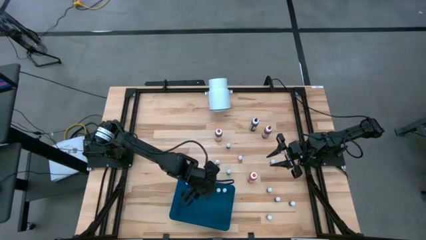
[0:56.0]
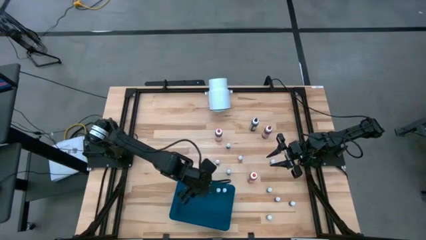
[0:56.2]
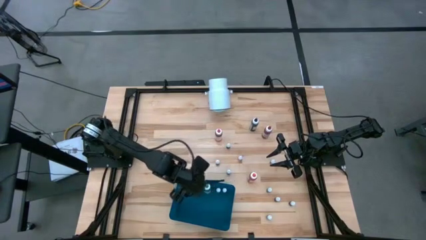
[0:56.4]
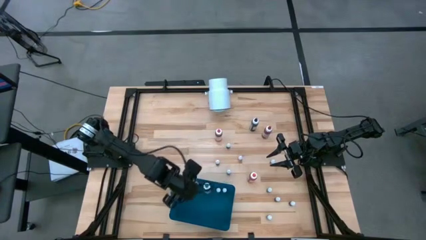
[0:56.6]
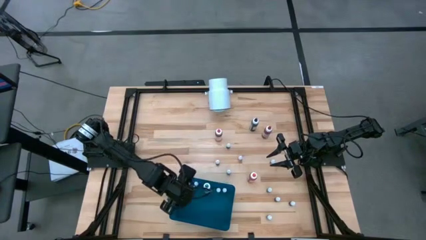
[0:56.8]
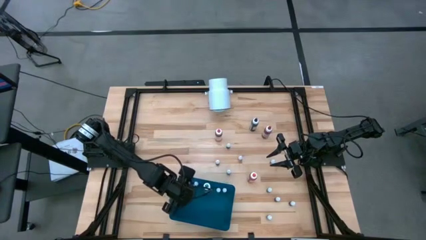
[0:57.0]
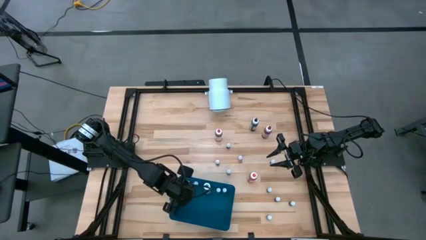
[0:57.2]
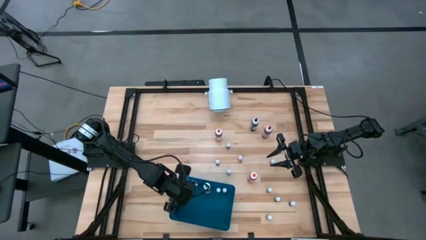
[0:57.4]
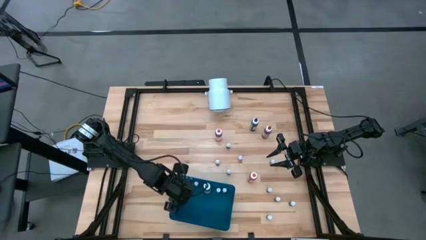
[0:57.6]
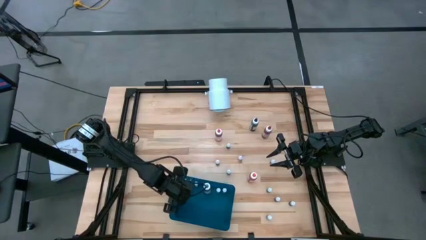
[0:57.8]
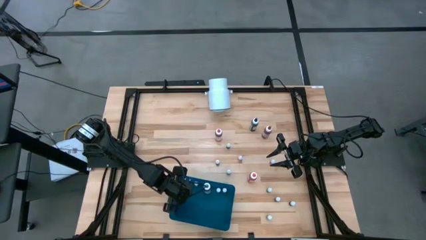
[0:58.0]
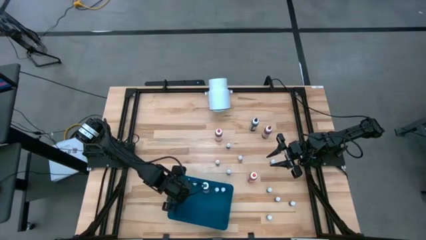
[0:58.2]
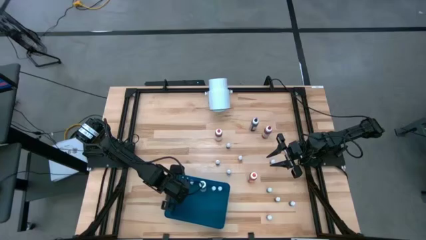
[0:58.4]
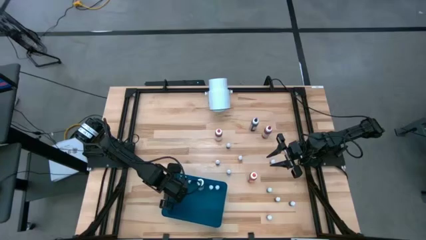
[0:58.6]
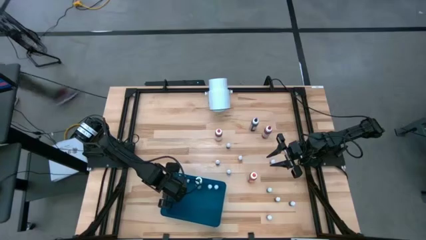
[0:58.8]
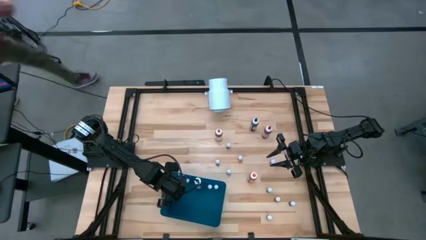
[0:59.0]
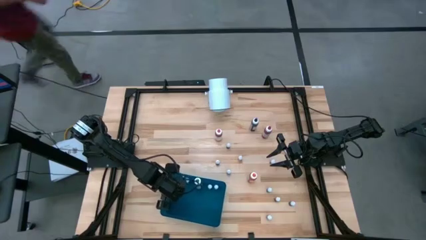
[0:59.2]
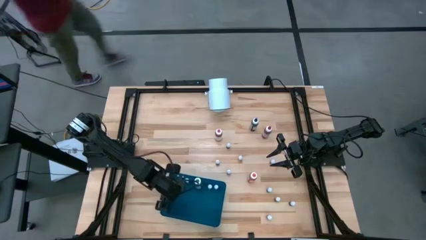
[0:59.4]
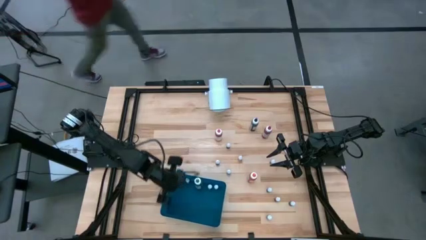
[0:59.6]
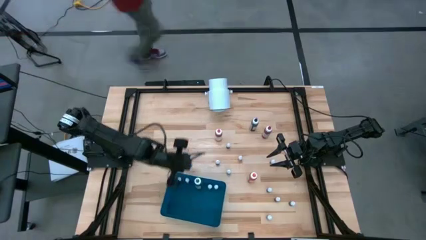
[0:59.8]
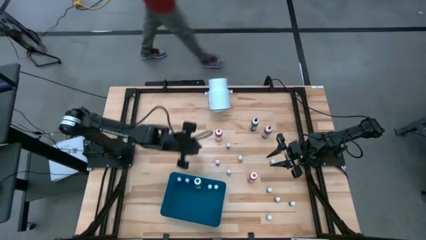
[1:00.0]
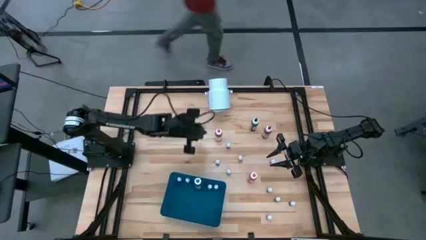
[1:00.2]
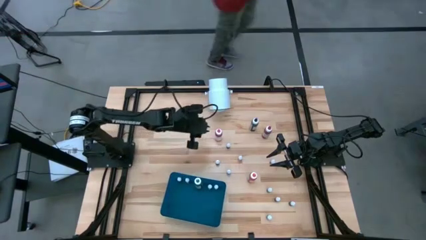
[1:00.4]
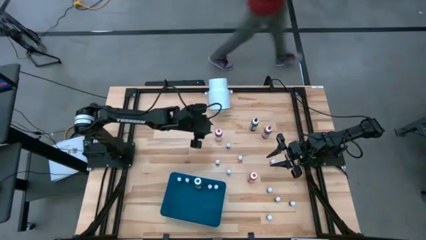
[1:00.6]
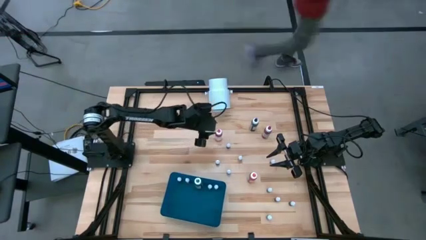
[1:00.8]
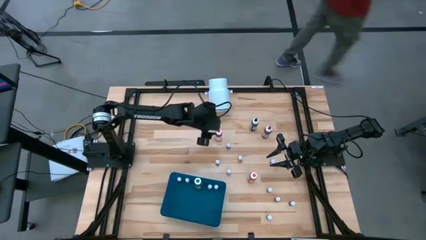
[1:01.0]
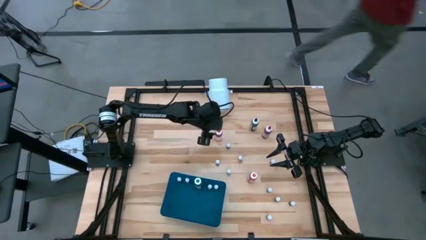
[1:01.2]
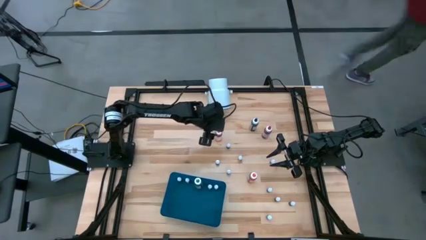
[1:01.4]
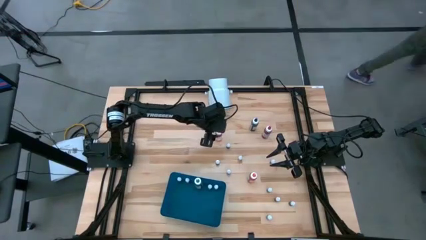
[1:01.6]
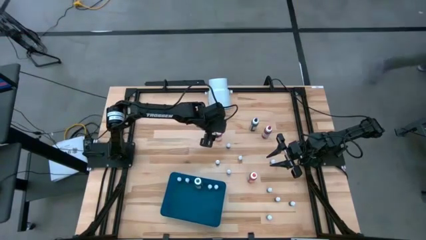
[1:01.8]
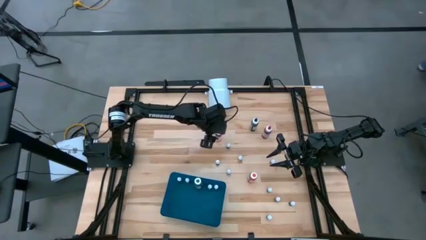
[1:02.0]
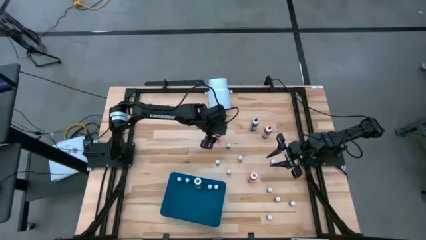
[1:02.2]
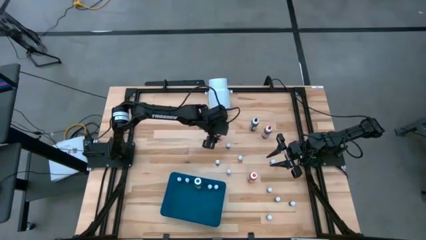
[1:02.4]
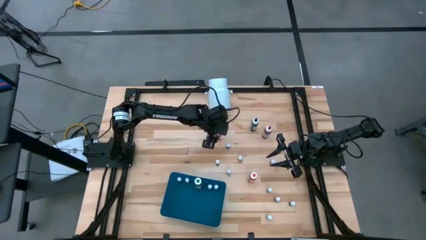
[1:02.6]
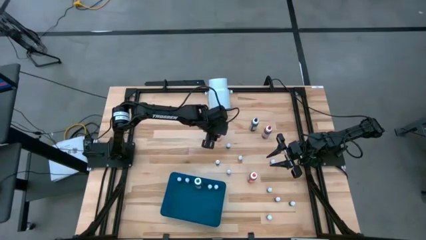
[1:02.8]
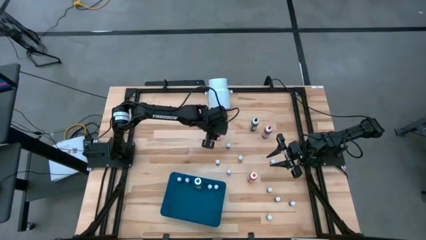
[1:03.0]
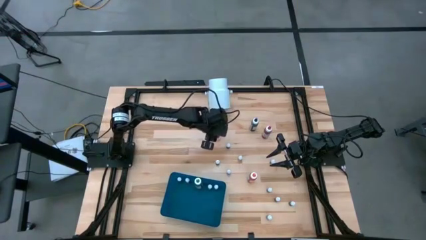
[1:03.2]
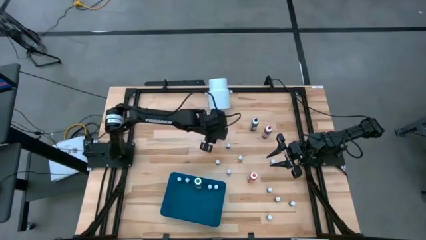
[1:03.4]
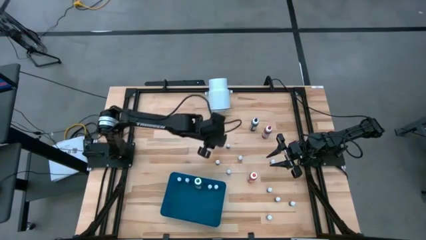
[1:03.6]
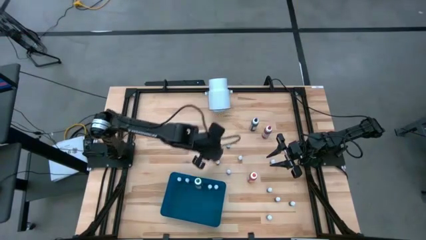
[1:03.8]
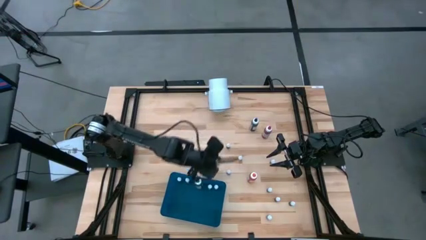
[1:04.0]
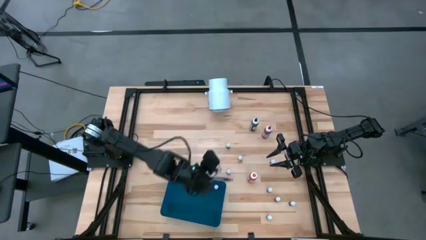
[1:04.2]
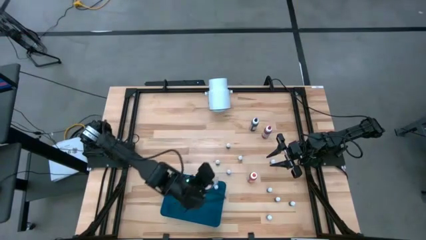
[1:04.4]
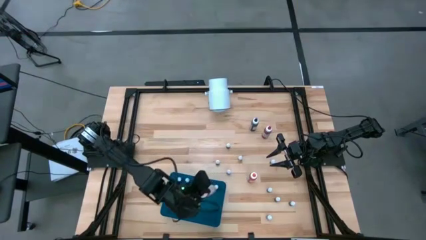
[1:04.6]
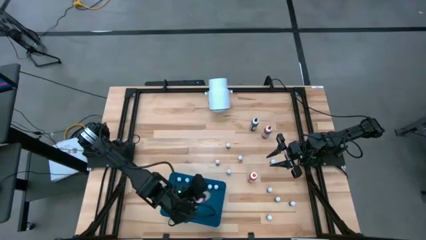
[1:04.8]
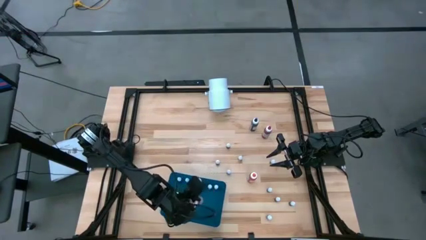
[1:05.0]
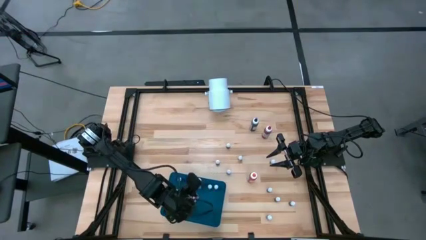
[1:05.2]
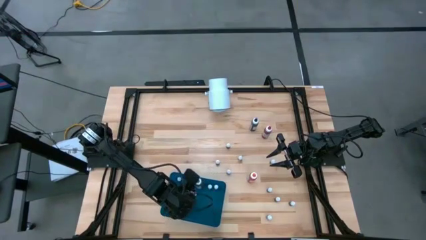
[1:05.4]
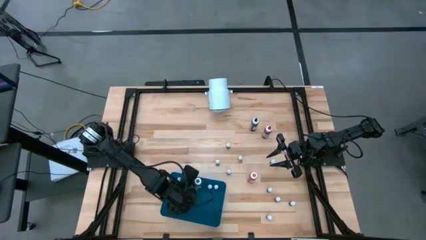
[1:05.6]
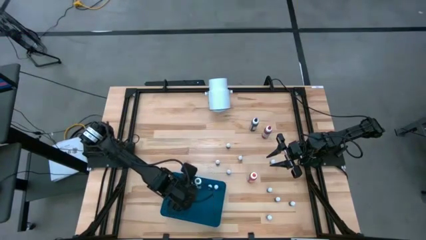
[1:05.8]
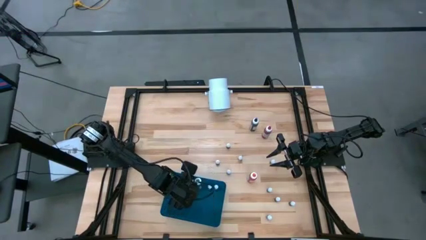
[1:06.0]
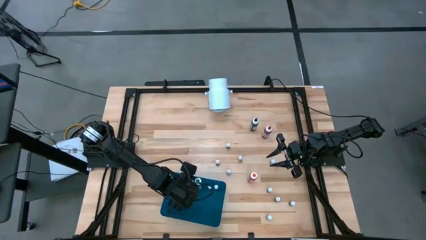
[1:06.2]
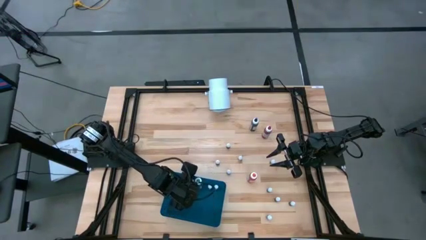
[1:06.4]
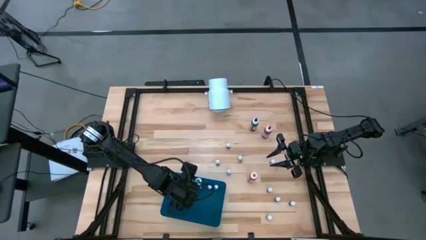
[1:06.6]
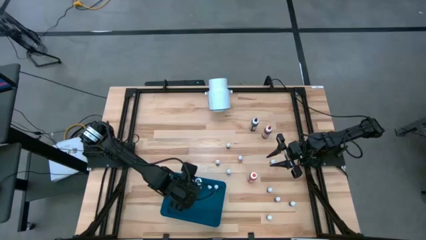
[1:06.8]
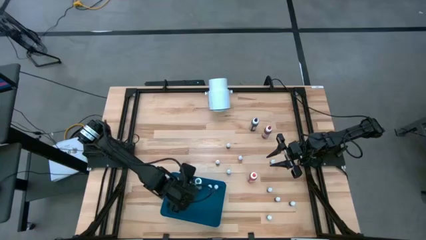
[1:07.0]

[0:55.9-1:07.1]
Task: Pick & Place food coloring
Put the large pink food coloring bottle into the blue bin

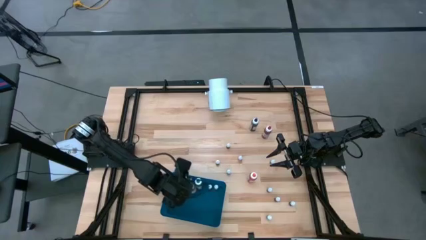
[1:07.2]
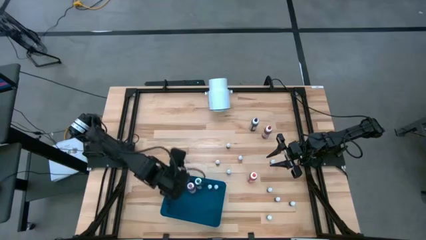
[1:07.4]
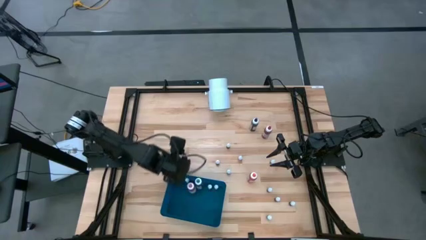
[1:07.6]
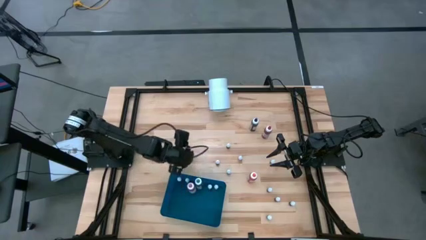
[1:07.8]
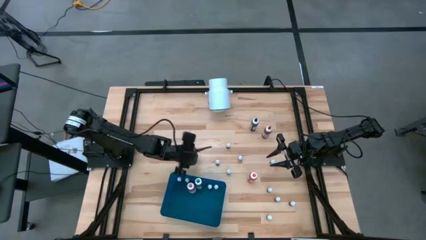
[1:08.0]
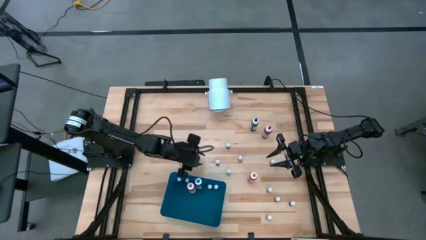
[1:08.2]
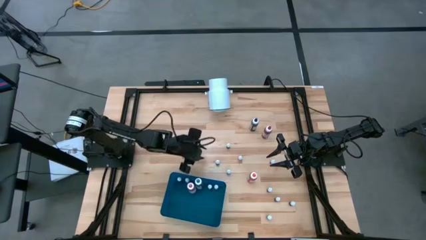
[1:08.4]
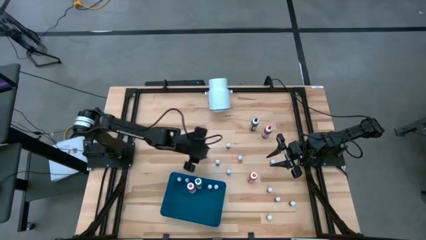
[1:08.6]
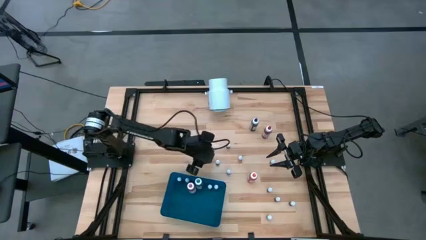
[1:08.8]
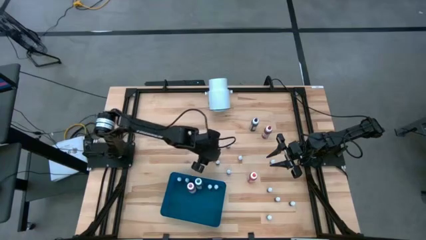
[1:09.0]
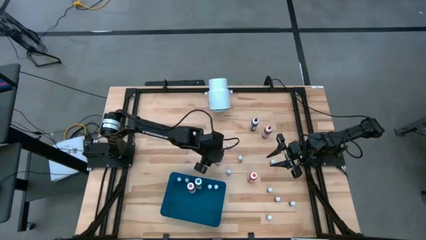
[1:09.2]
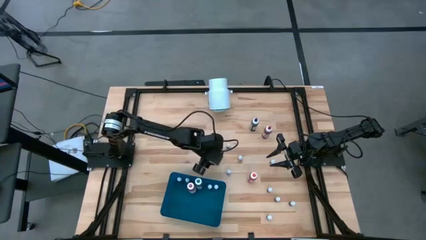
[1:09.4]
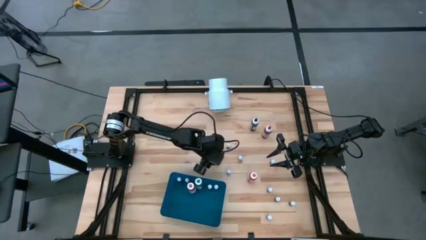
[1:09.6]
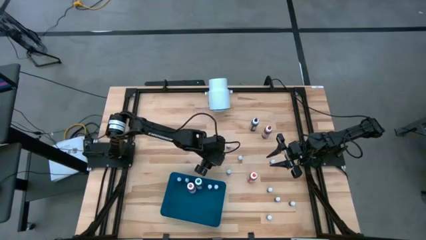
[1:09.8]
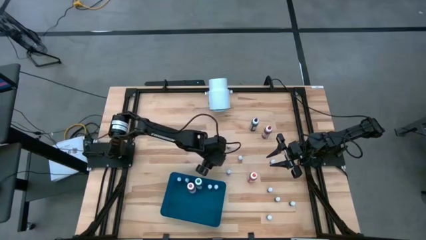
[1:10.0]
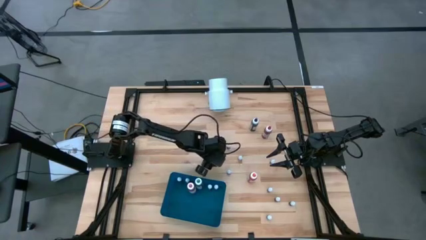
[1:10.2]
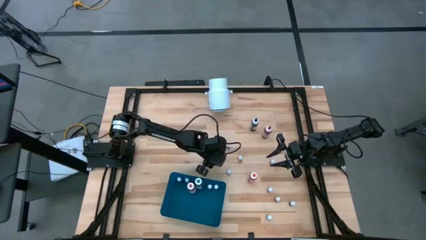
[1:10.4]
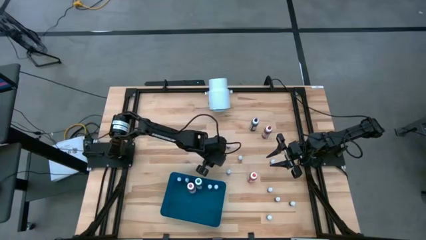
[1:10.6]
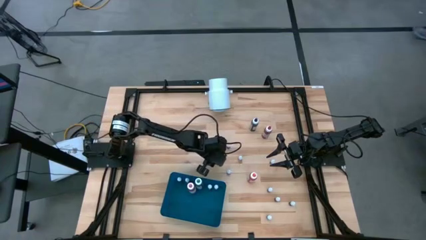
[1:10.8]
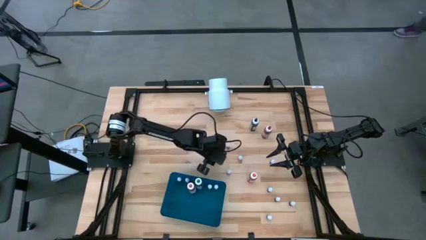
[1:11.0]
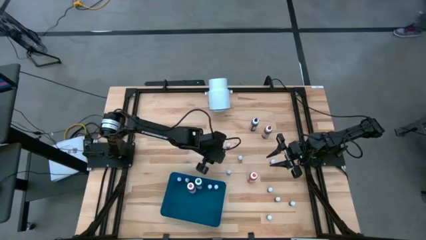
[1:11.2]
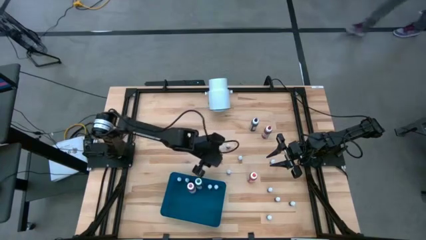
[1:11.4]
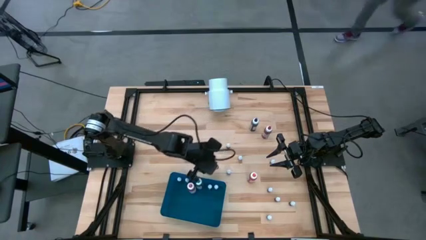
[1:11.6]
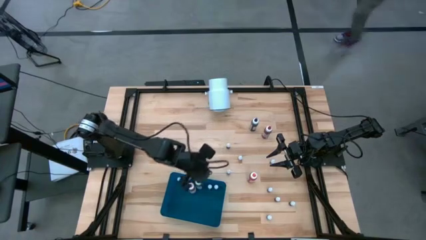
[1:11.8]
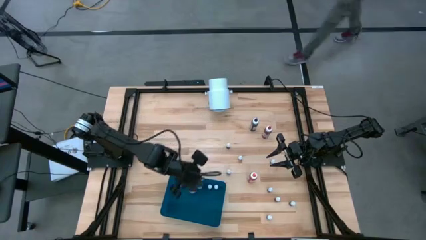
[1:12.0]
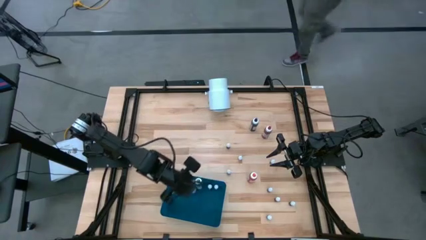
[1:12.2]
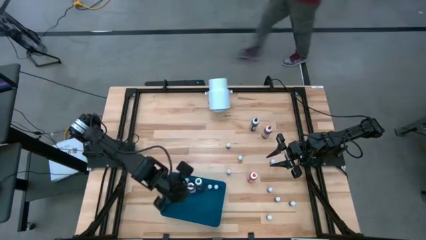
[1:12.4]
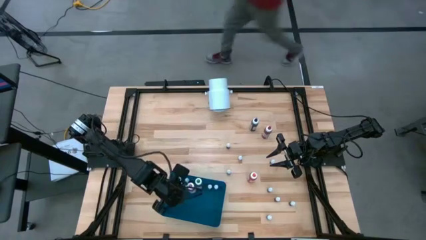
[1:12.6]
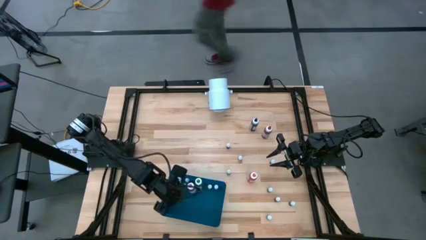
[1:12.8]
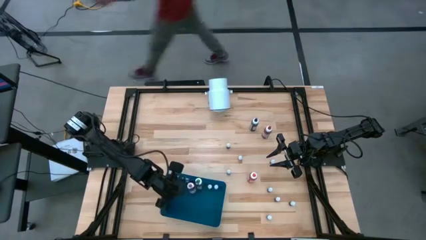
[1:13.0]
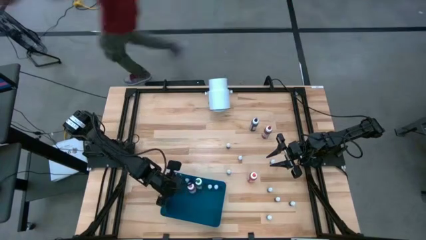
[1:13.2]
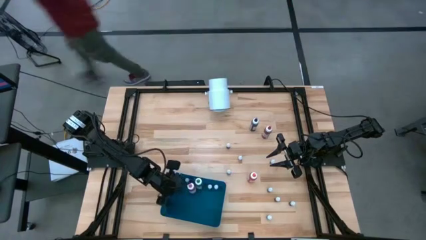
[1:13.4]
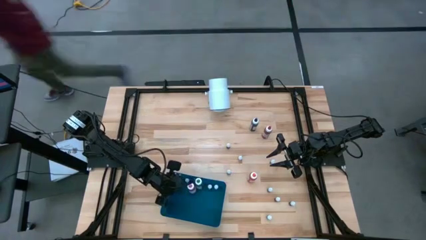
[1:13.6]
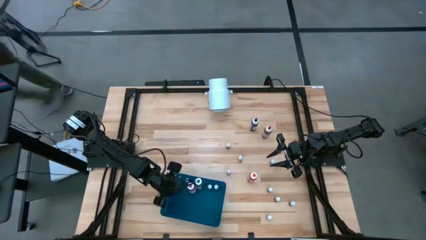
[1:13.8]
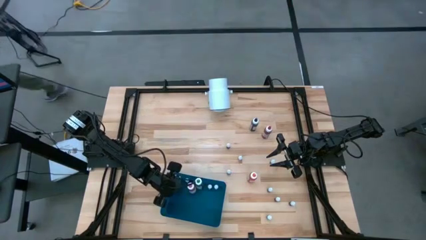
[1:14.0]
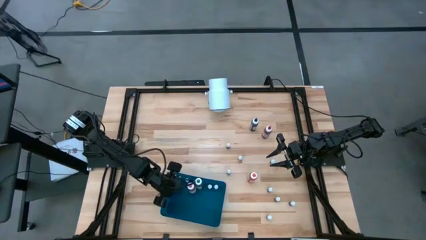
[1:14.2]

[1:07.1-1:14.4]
Put the small black food coloring bottle into the blue bin
